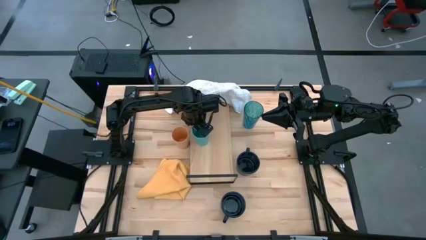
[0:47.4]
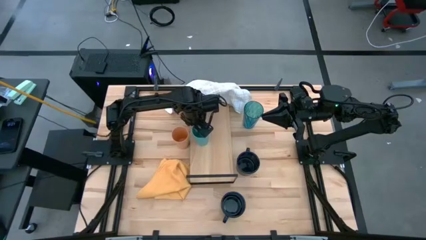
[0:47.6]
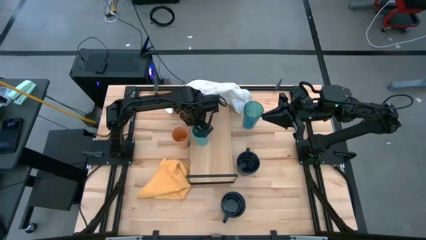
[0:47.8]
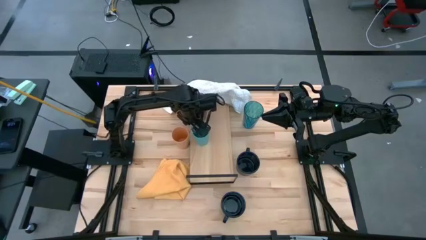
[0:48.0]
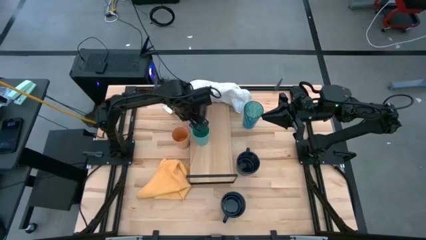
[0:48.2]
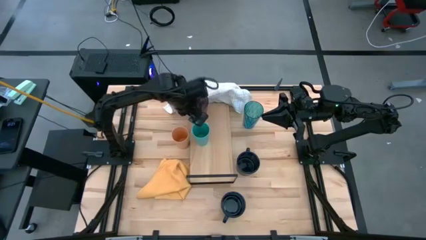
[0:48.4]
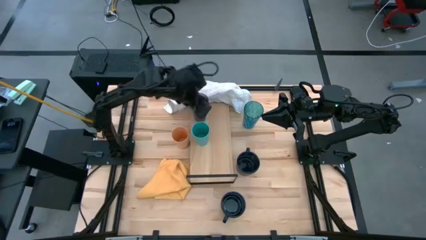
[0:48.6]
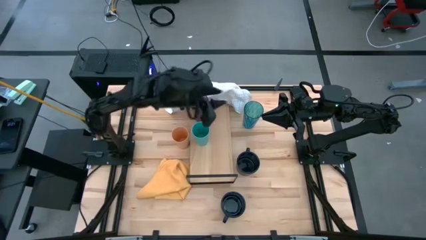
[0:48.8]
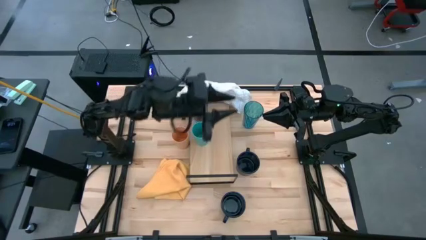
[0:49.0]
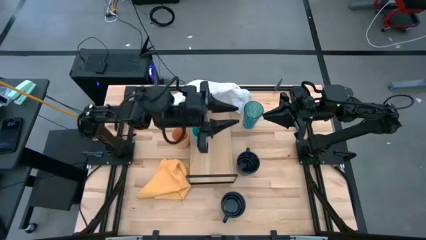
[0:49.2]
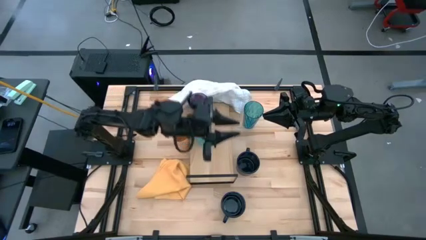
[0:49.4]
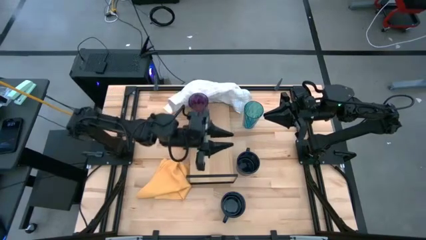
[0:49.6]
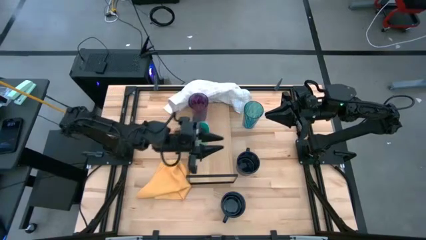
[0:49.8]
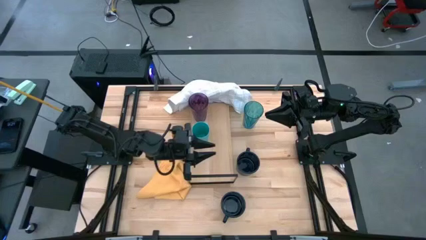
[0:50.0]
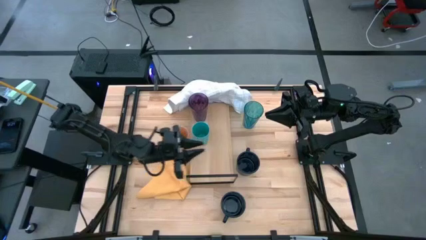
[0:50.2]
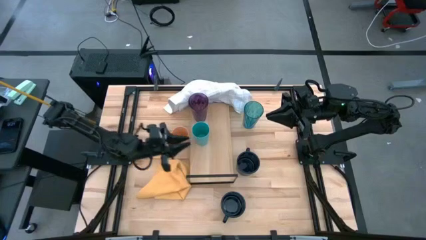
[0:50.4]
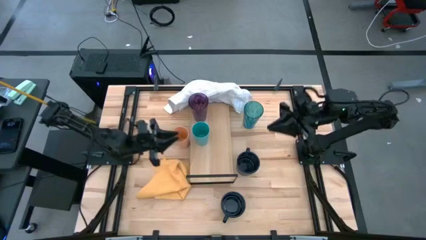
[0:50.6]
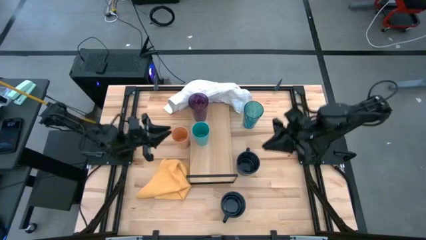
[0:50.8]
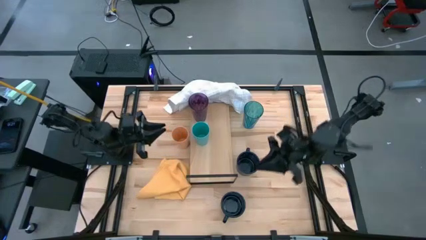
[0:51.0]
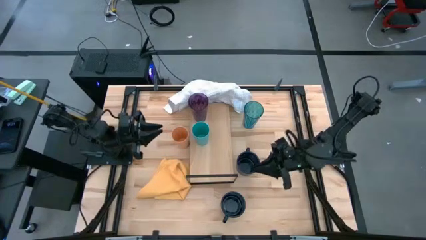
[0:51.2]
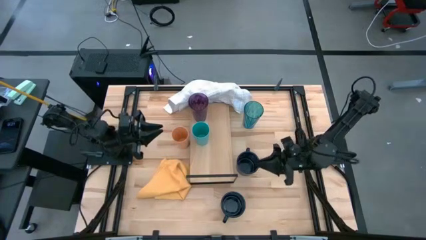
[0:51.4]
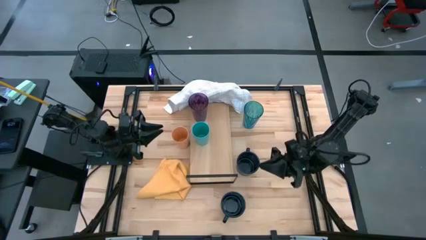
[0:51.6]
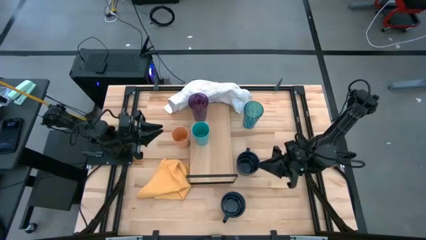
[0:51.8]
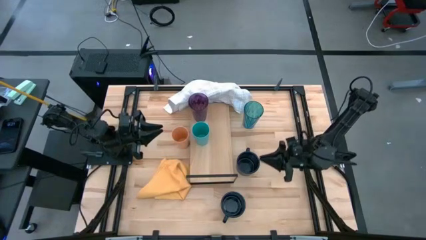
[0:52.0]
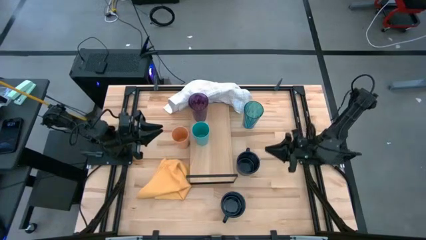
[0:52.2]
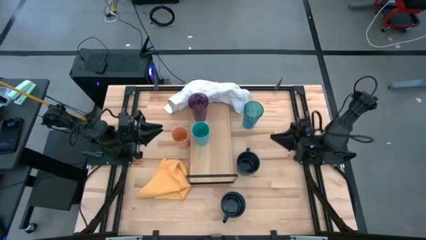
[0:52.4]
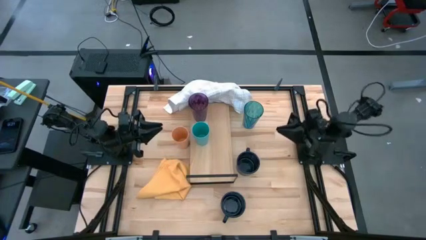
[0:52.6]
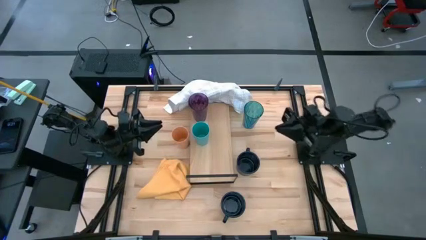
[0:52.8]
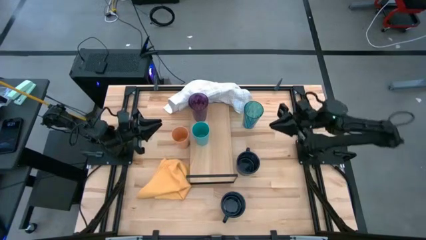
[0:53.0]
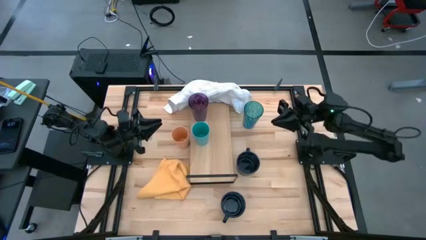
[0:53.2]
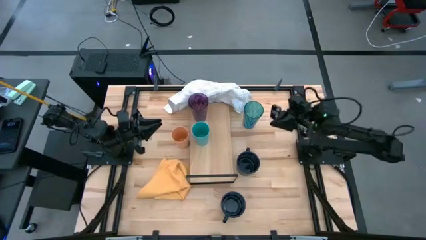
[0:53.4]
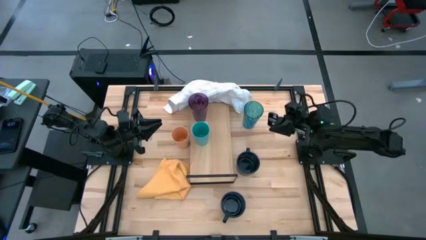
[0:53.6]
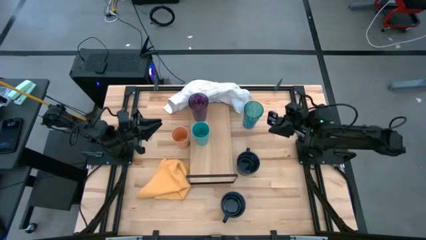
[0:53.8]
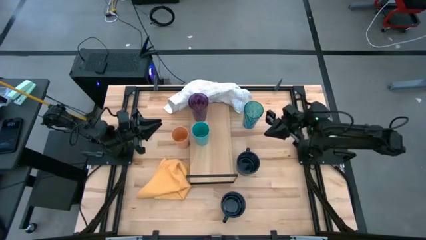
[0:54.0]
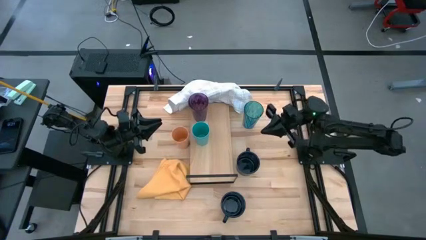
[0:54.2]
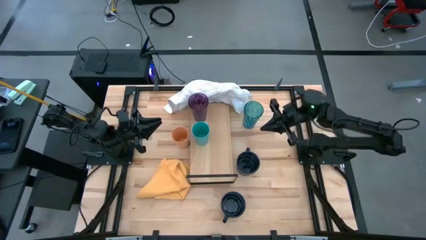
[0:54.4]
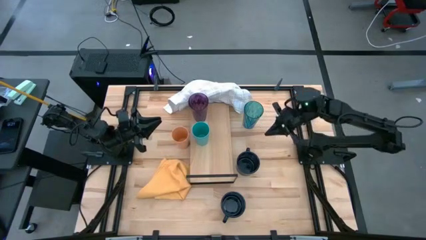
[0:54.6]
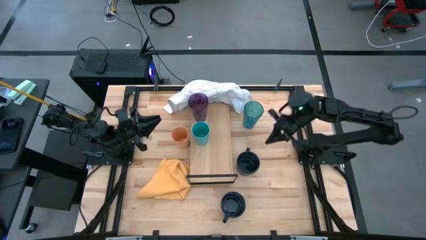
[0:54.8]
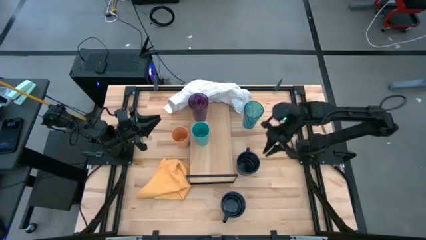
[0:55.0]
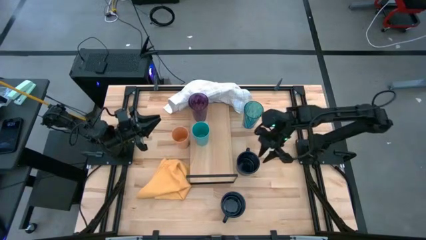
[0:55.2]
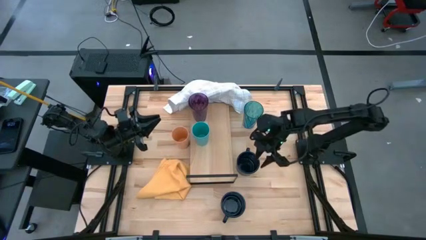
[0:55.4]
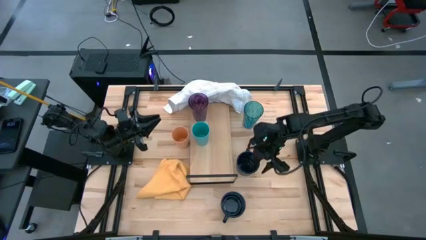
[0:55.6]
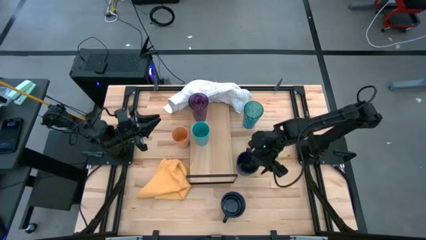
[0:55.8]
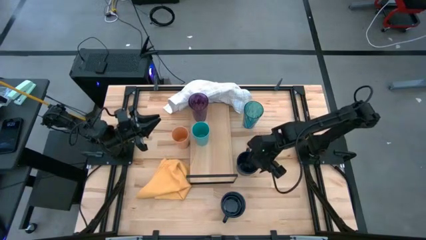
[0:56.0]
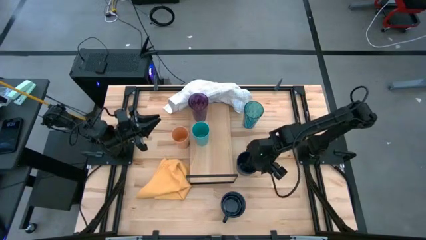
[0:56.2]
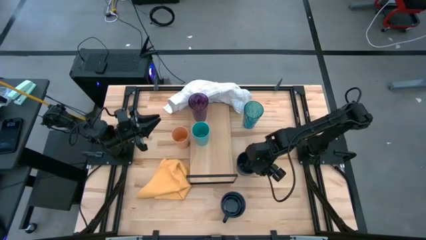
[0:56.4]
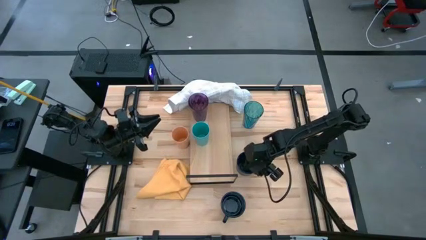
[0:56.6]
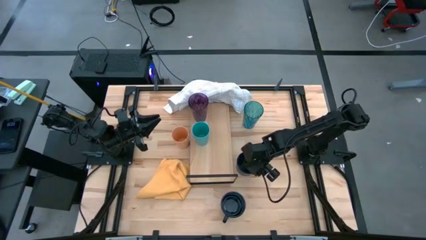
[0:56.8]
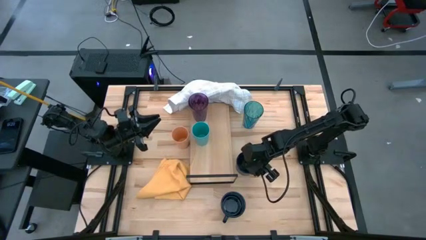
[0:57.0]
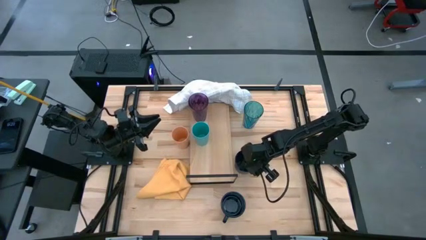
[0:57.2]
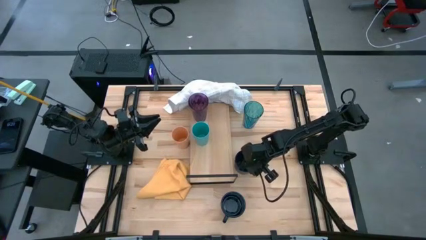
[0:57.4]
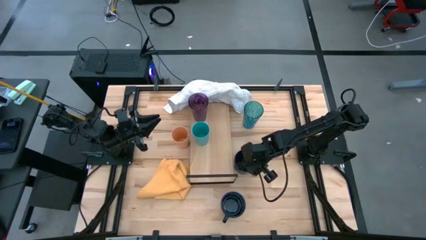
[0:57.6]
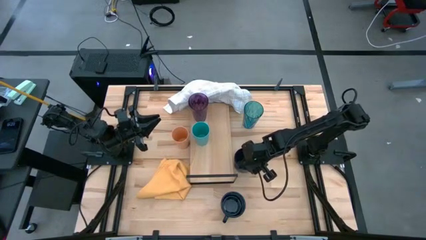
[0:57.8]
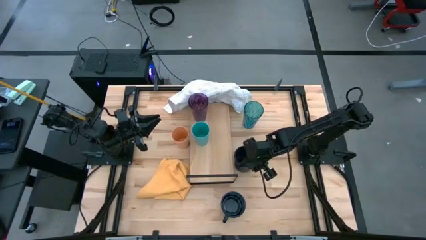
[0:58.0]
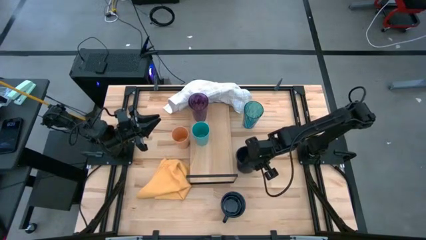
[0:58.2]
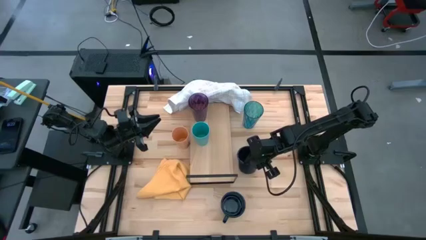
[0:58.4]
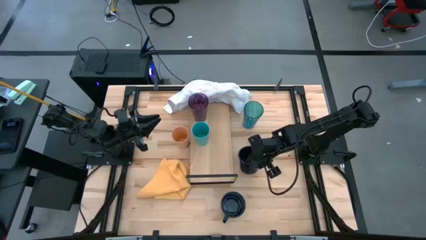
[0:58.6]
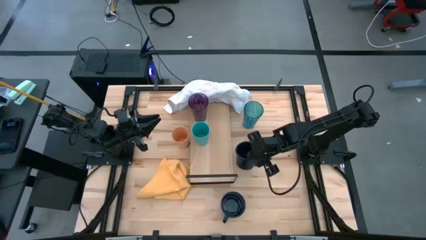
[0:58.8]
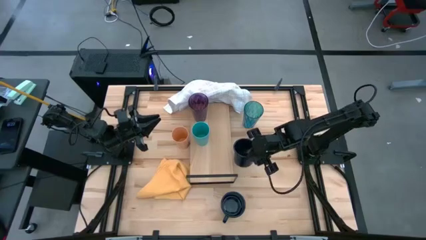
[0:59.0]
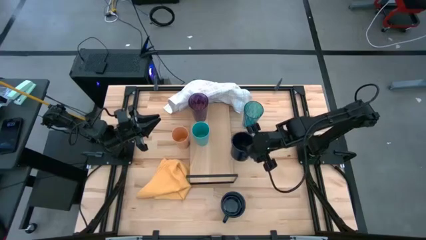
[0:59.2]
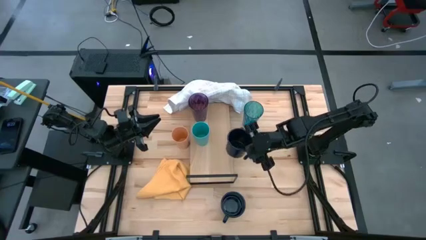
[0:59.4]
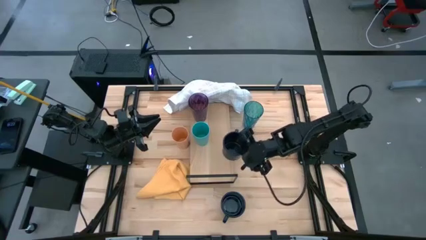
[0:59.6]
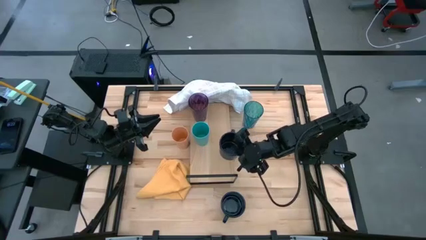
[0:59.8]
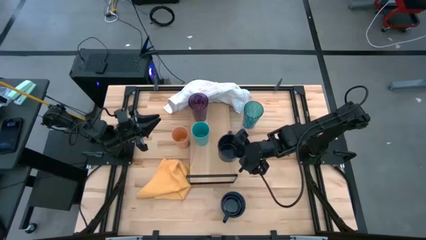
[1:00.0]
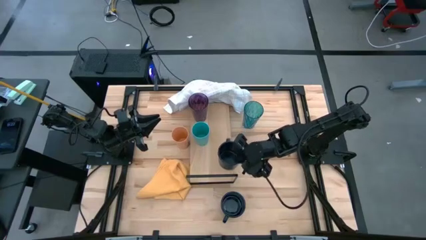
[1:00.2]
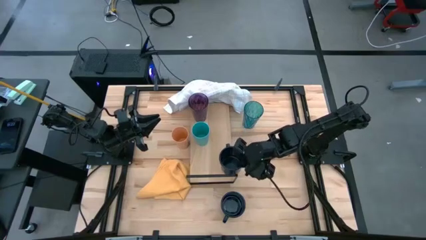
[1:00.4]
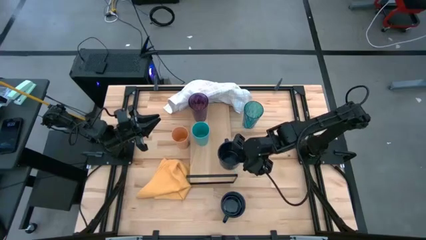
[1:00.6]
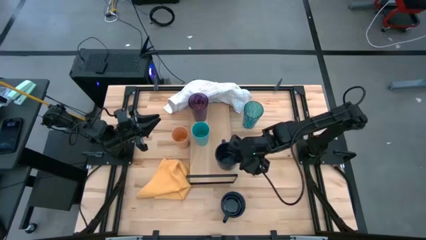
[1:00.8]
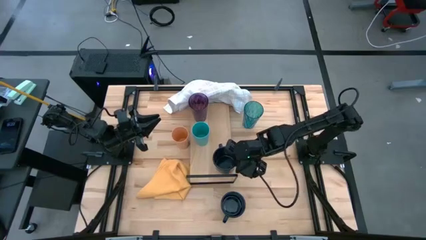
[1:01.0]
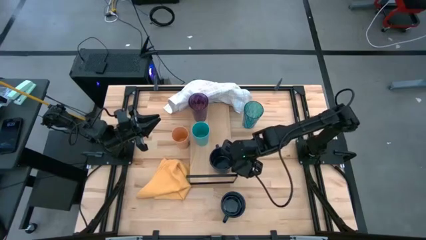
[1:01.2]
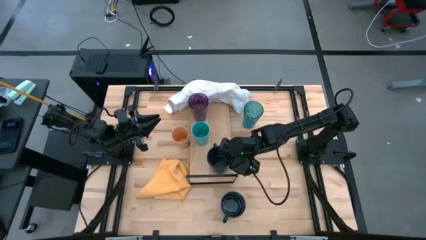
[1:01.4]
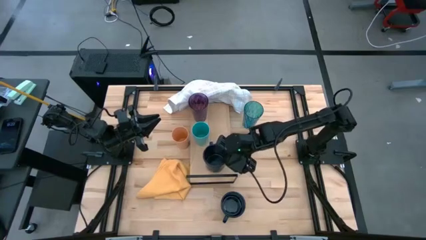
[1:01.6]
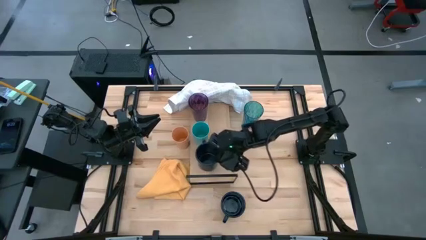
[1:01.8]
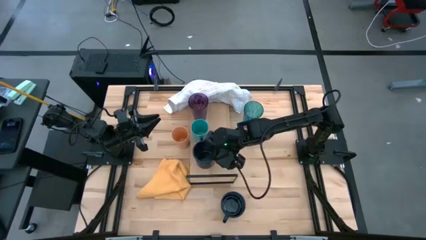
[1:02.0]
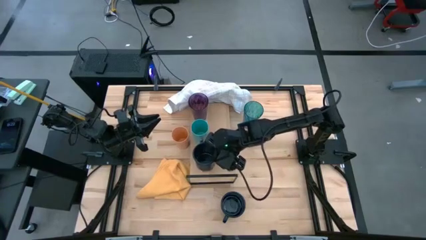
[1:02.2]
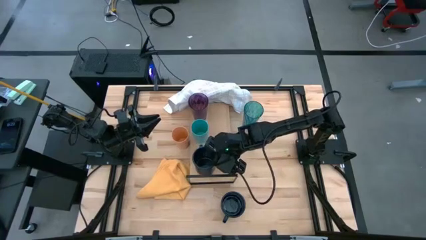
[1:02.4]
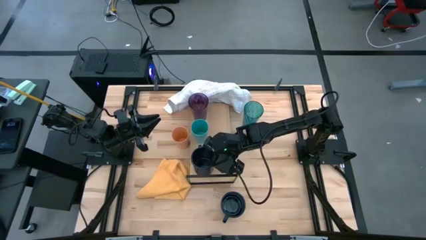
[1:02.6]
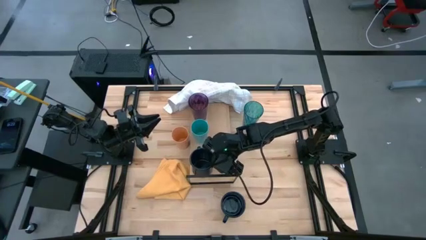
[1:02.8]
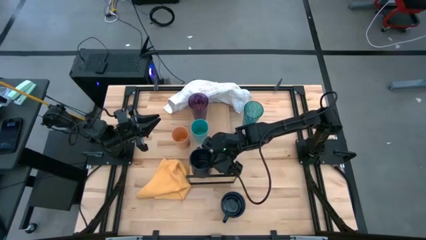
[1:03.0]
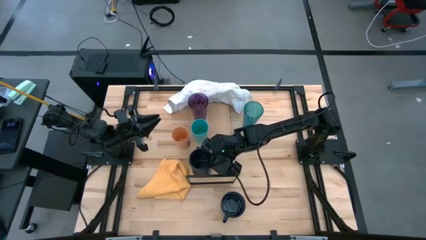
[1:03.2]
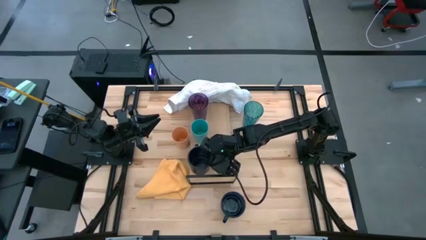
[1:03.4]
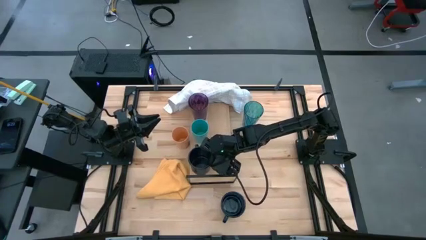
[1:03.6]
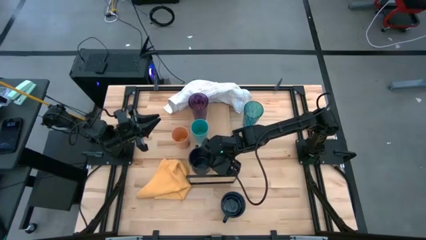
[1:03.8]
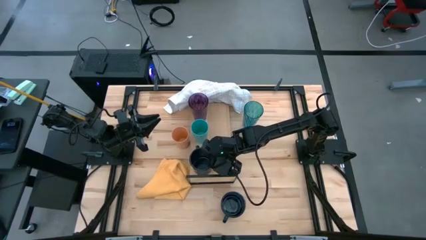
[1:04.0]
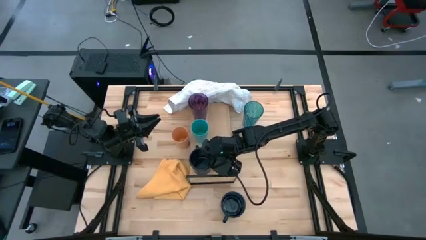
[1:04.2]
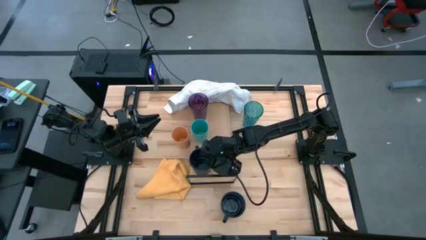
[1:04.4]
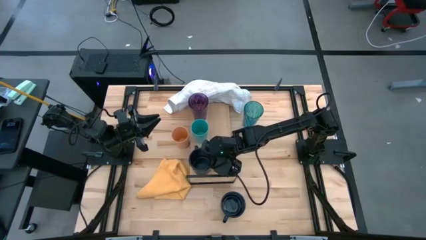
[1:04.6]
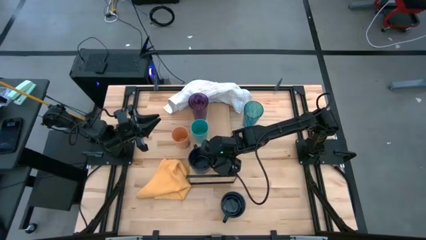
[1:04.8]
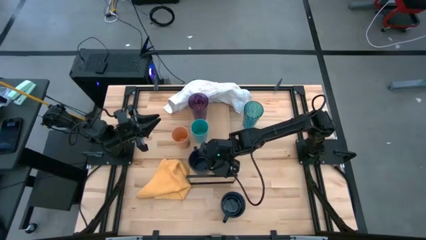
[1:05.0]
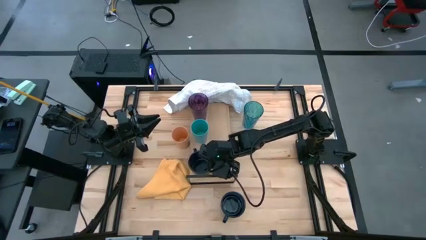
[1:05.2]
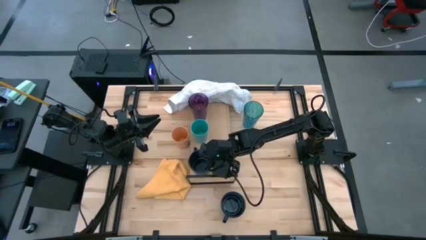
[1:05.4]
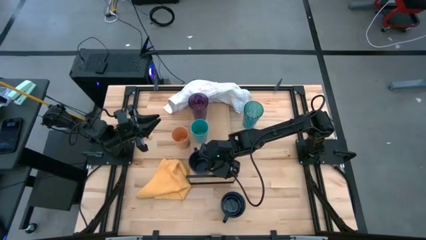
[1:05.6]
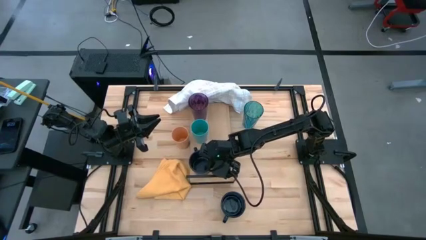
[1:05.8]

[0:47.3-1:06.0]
Task: Stack small to large cups/mugs on shelf
Put the top black mug on the shelf
